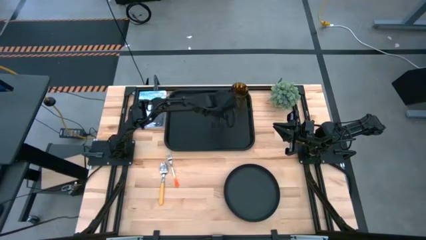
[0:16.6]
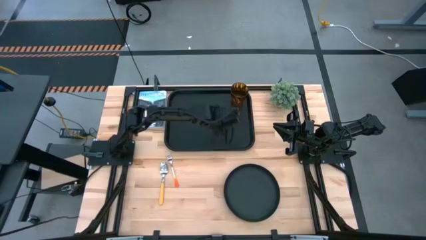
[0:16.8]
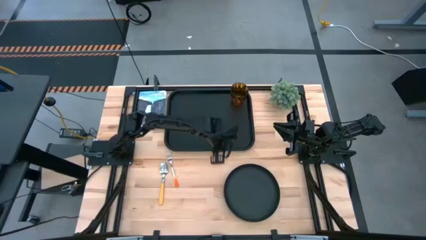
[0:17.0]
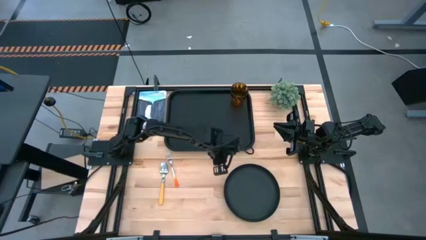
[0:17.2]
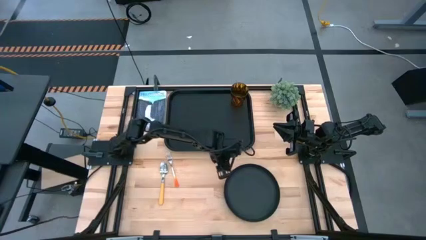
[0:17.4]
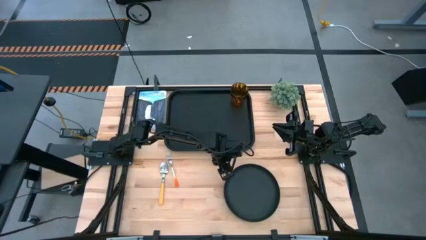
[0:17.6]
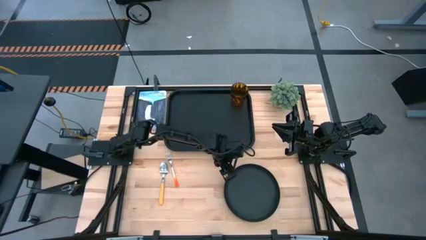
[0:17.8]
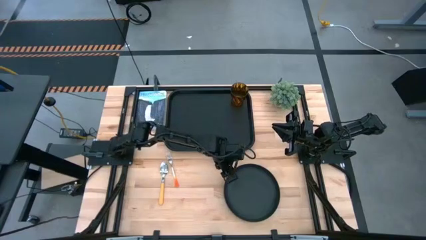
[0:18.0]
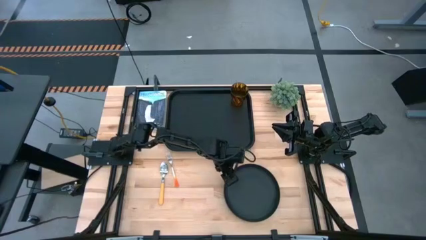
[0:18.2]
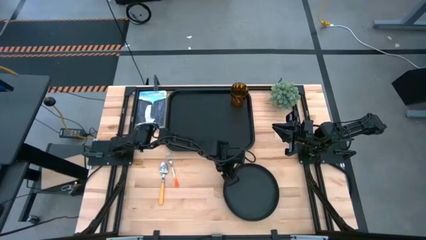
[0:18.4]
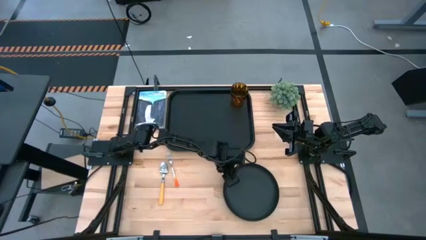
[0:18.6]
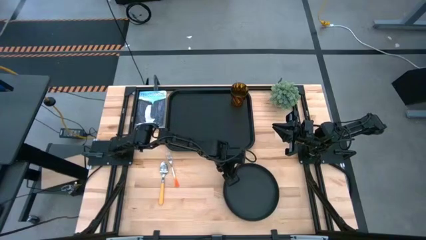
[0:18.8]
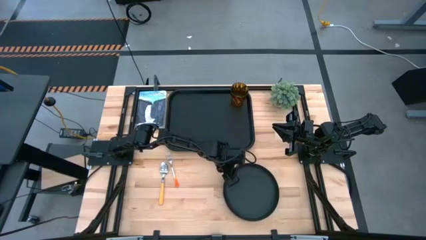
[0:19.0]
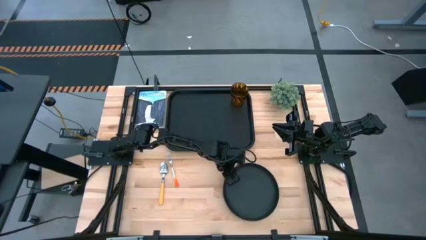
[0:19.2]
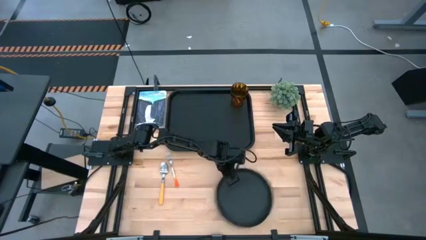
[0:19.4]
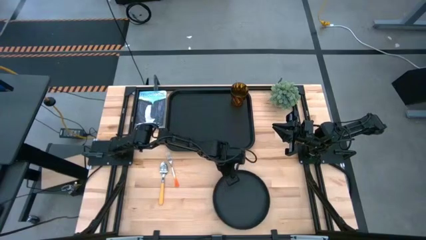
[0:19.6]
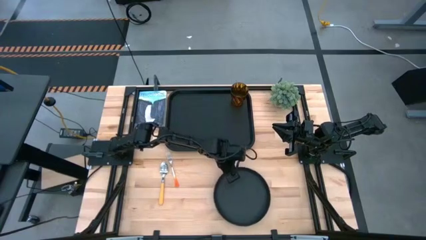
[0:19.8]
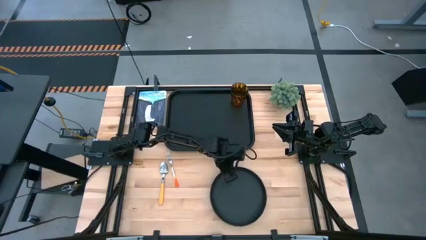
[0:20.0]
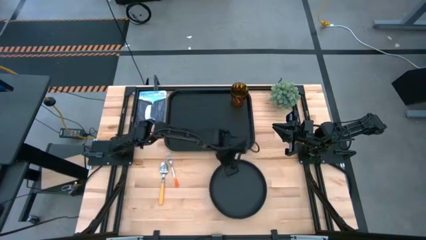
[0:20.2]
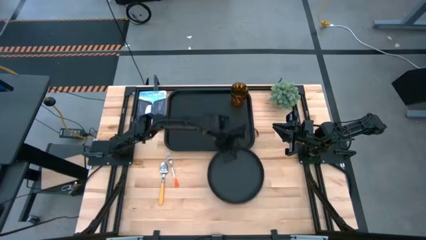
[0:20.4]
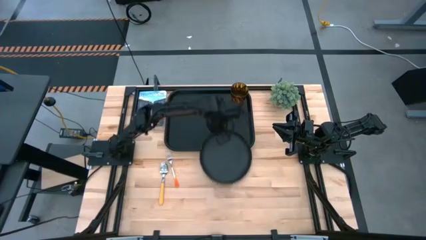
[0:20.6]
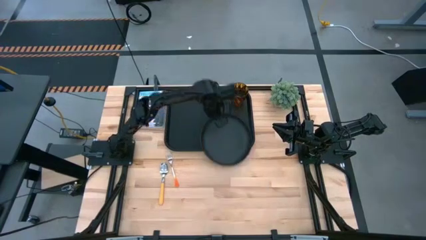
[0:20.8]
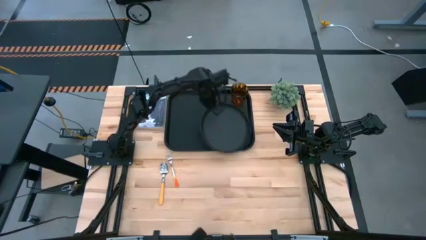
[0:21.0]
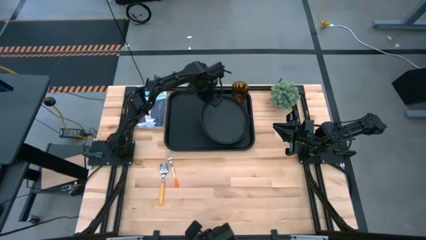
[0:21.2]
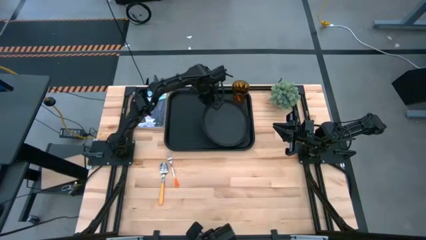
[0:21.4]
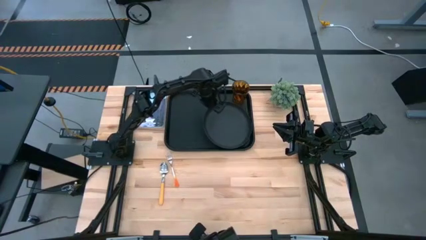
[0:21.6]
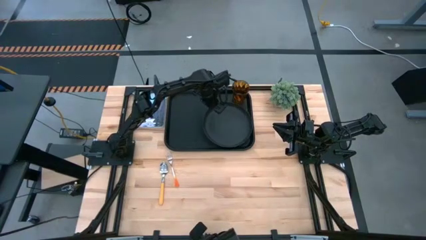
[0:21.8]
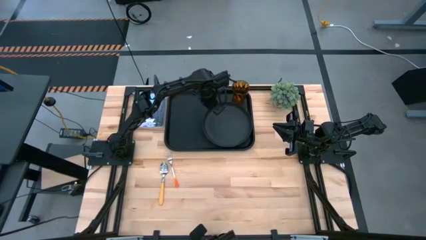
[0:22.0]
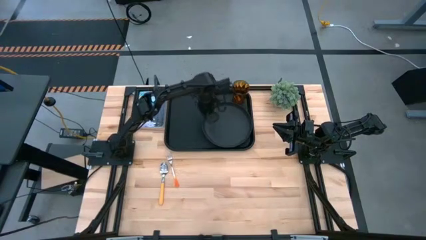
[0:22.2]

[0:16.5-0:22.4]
Task: Pick and place plate/cup/fork/spoon on tray
Put the black plate on the black serving tray to the bottom of the red cup

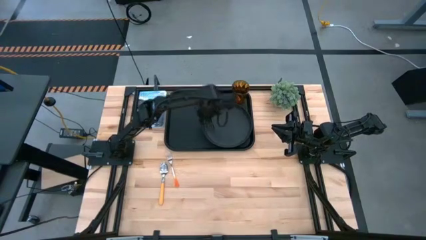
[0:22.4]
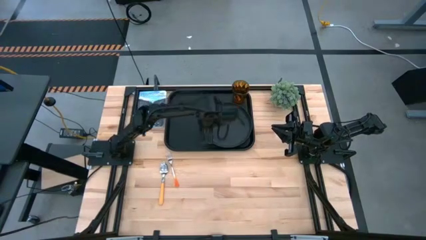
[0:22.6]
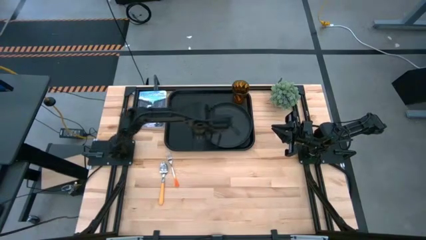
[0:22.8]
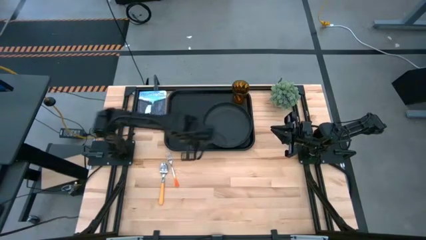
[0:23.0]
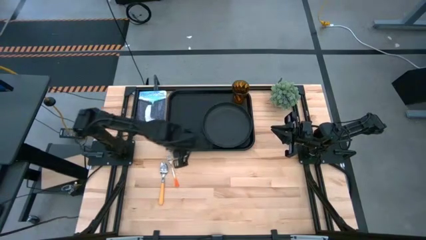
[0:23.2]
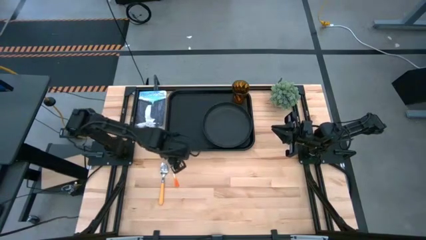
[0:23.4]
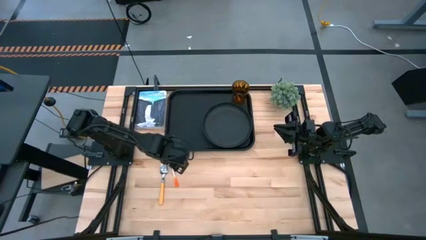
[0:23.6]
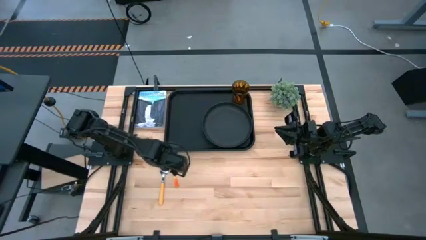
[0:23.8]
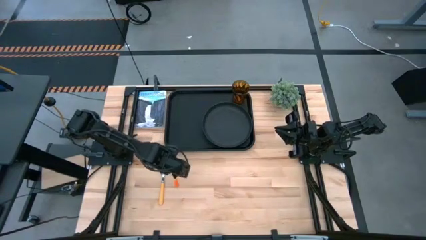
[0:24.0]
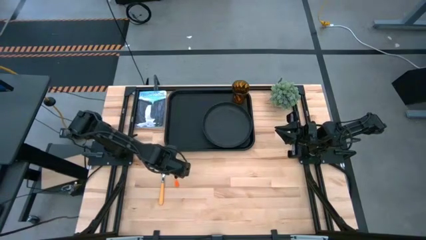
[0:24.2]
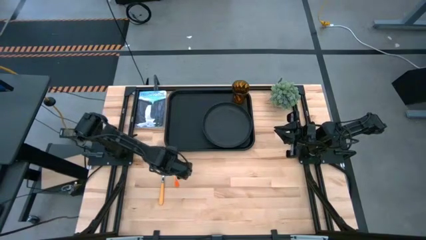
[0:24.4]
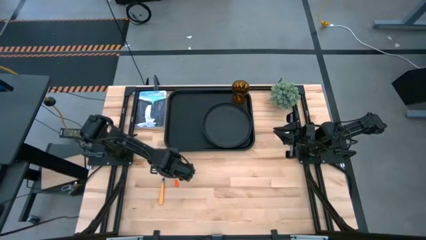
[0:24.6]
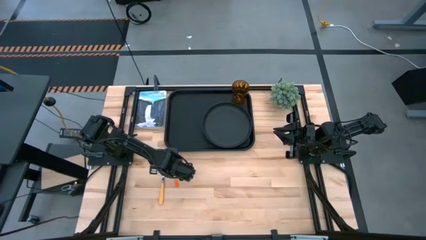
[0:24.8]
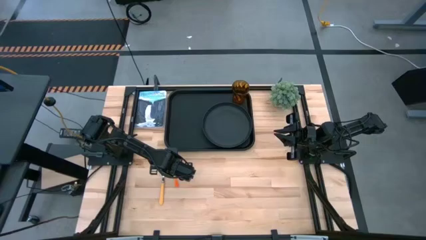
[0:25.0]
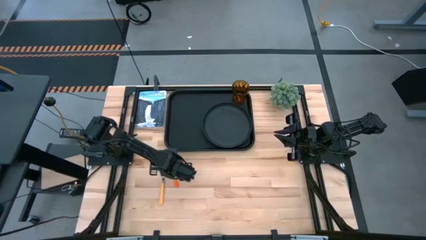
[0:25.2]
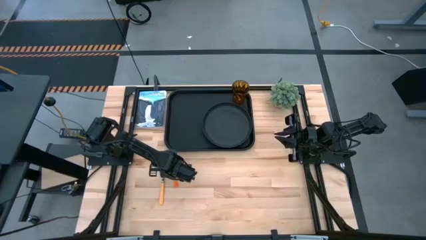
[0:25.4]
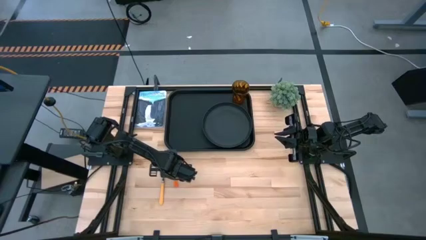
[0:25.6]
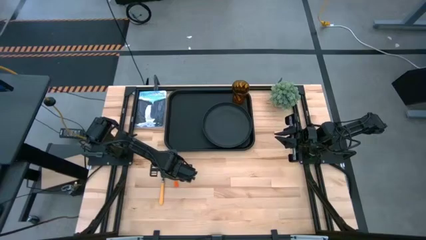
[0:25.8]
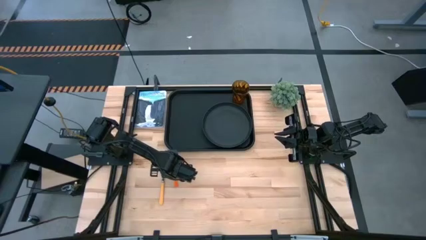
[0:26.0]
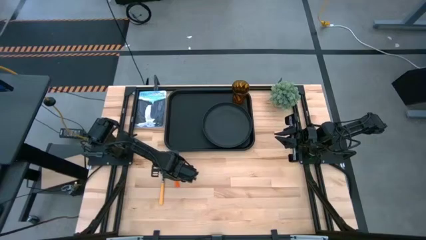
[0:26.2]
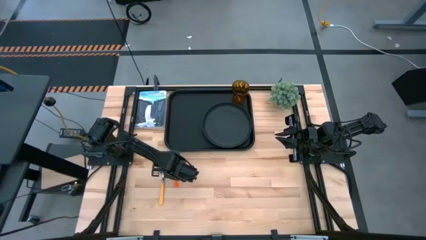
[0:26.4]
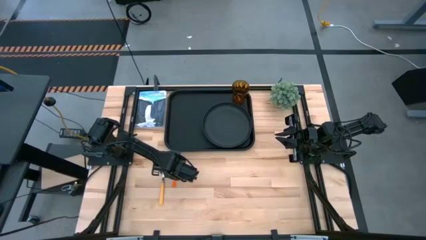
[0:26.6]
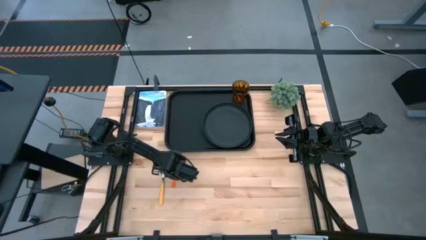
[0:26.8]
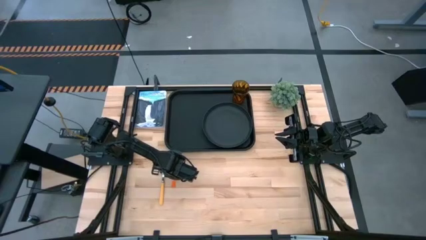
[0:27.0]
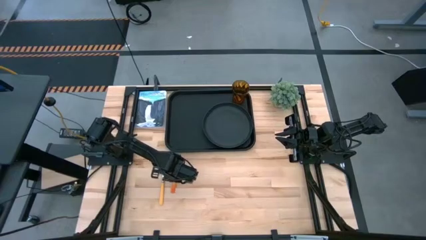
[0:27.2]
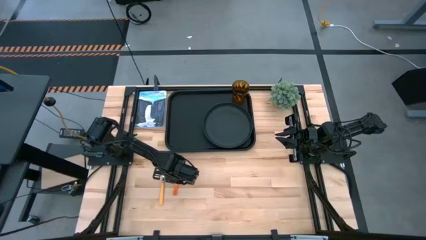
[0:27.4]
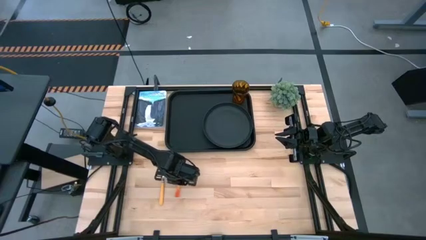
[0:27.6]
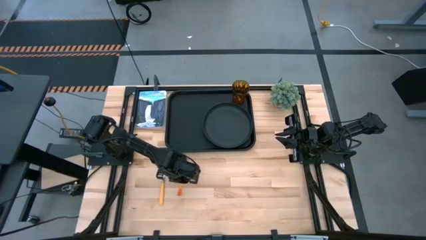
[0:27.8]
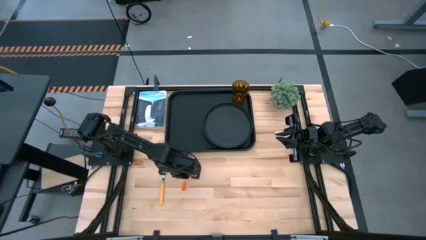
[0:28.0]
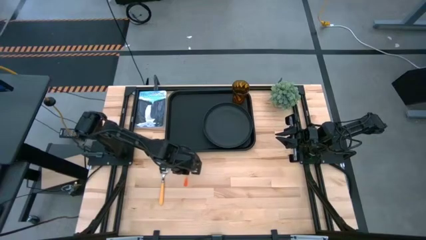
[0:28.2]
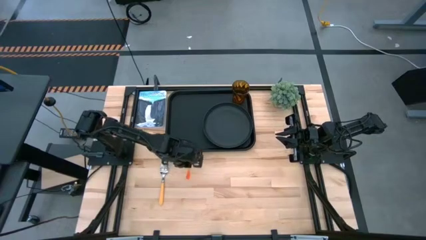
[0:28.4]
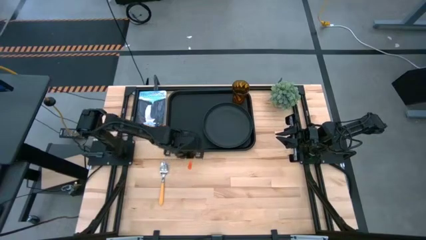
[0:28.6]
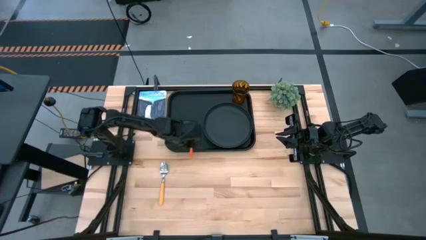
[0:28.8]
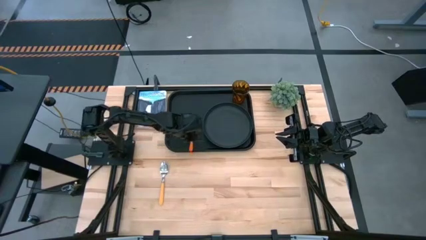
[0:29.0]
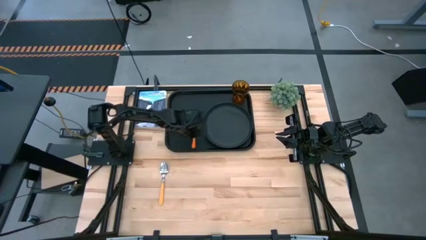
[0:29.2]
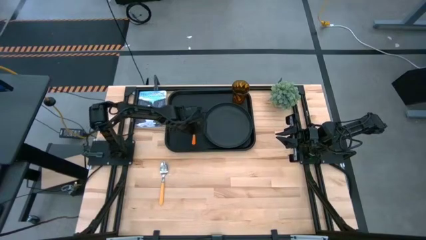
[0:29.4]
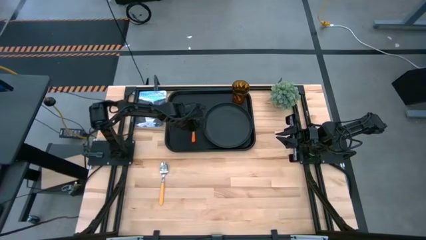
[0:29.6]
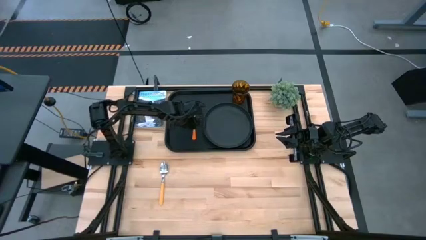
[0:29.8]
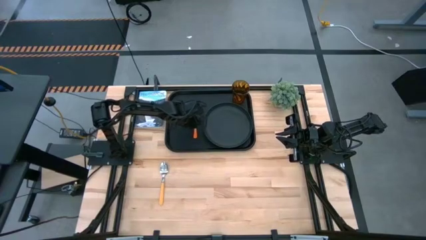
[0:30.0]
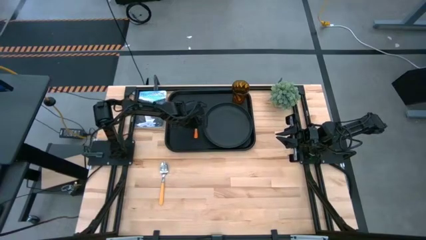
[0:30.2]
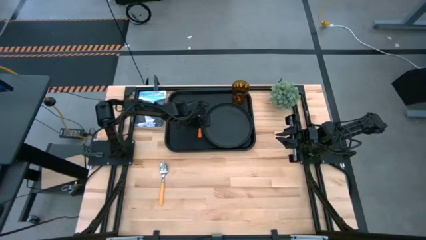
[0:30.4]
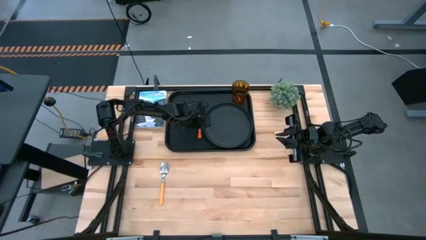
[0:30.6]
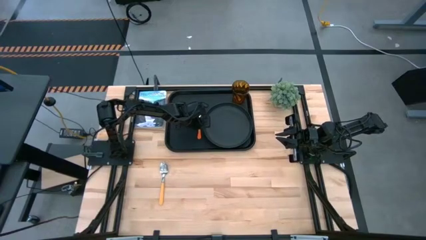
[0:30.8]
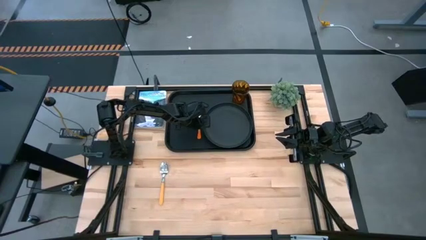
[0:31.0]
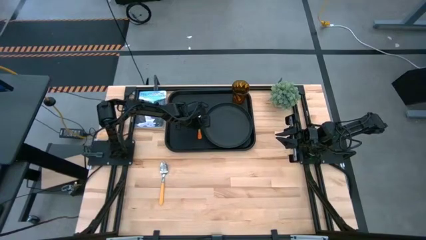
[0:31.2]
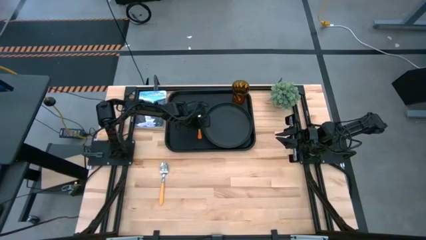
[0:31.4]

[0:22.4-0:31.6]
Put the orange fork on the black serving tray to the left side of the black plate

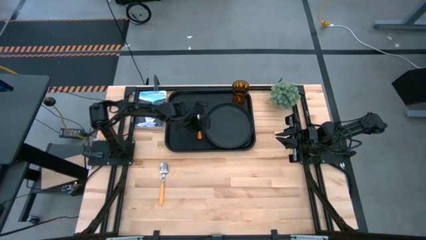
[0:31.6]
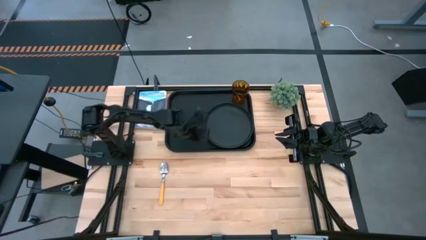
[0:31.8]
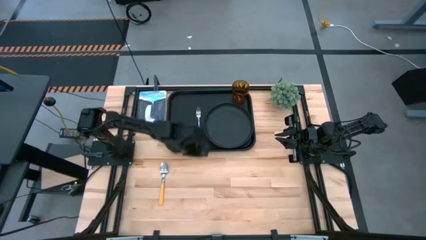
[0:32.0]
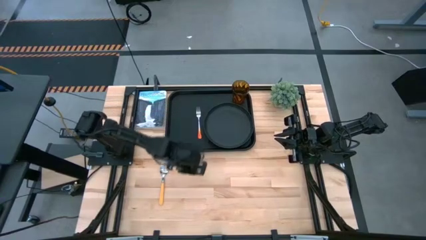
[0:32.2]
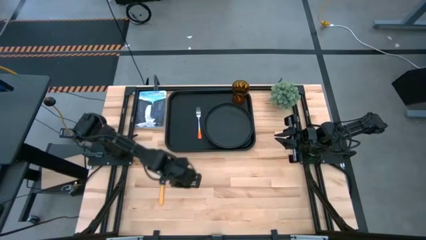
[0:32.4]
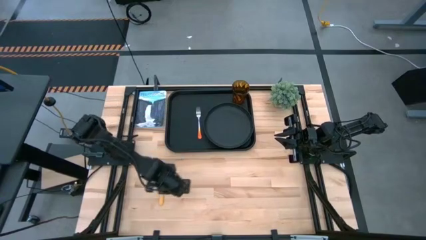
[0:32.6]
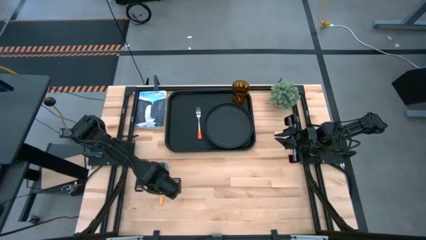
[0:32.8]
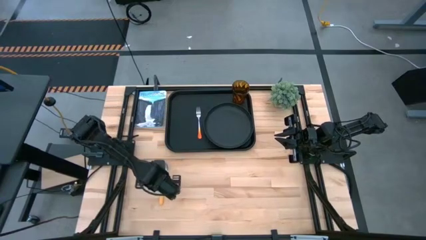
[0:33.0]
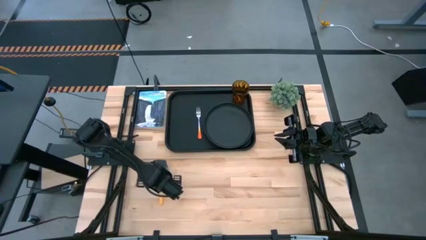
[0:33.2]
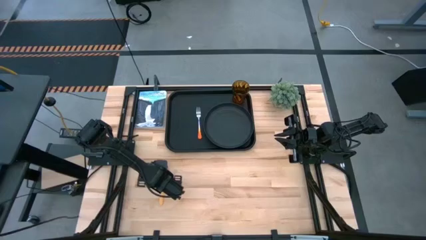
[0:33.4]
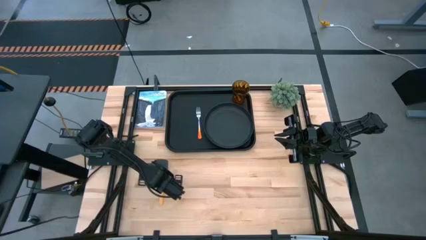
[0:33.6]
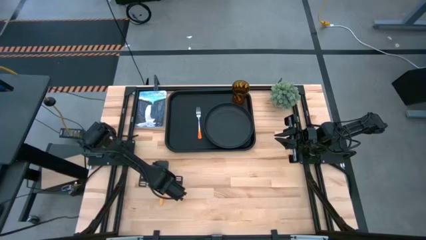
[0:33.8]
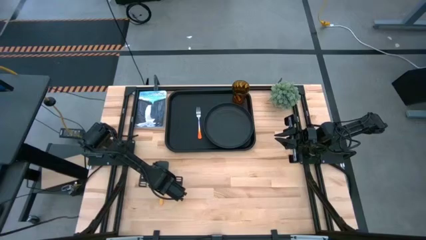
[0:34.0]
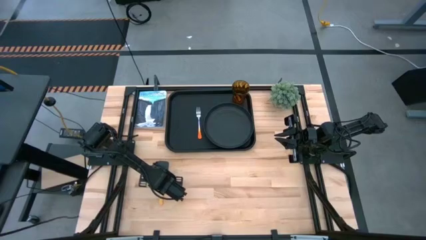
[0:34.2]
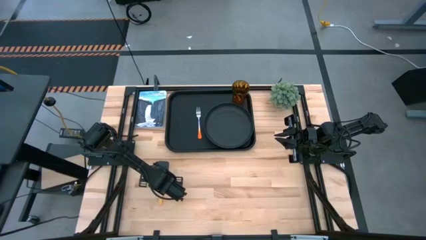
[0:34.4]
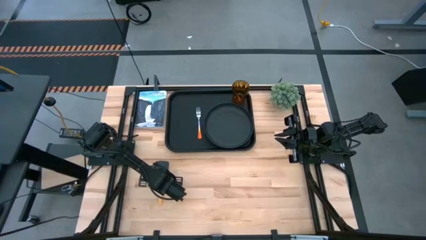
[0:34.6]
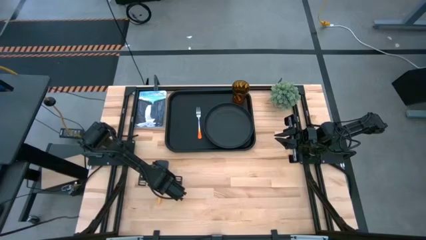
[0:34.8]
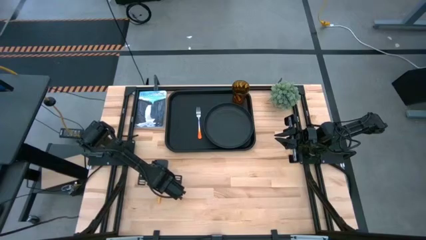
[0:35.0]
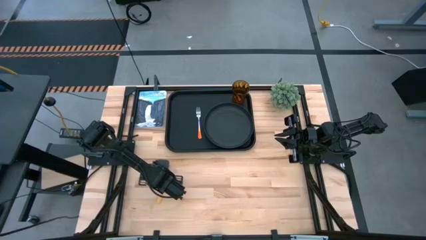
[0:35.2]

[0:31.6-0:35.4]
Put the yellow spoon on the black serving tray to the left side of the black plate
